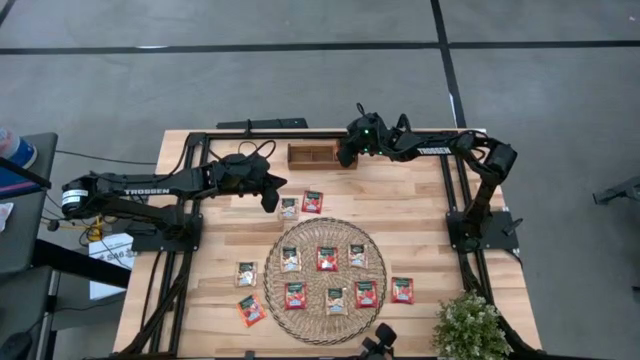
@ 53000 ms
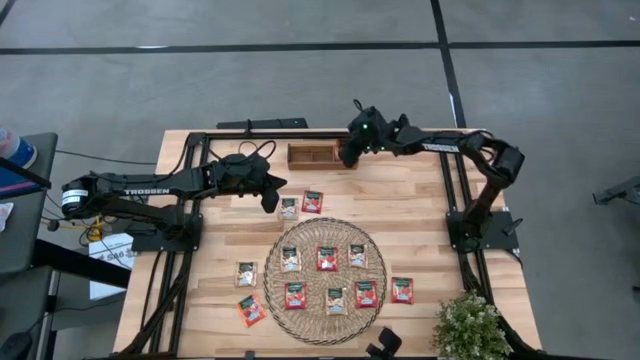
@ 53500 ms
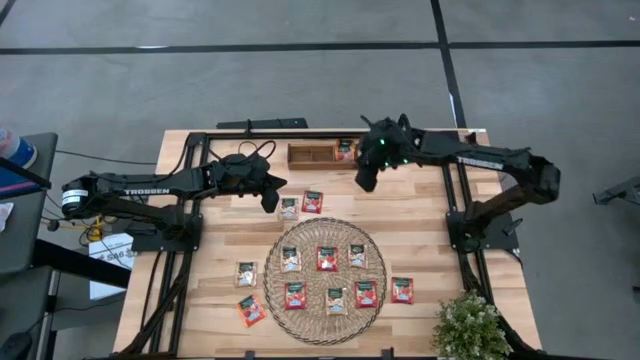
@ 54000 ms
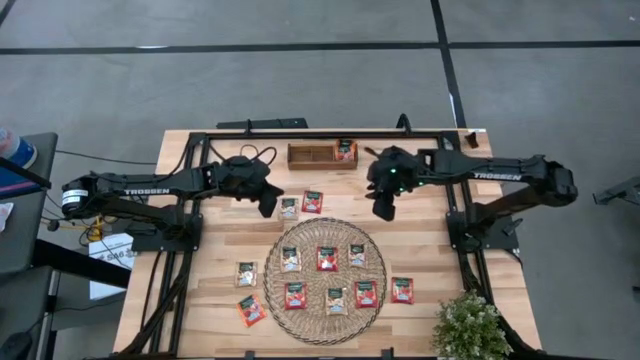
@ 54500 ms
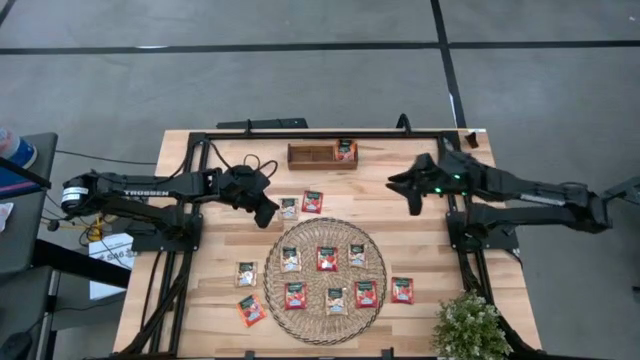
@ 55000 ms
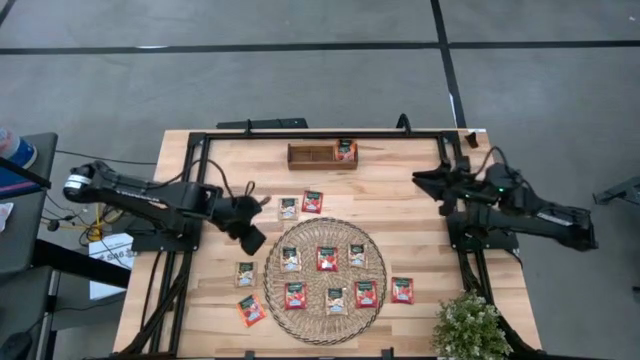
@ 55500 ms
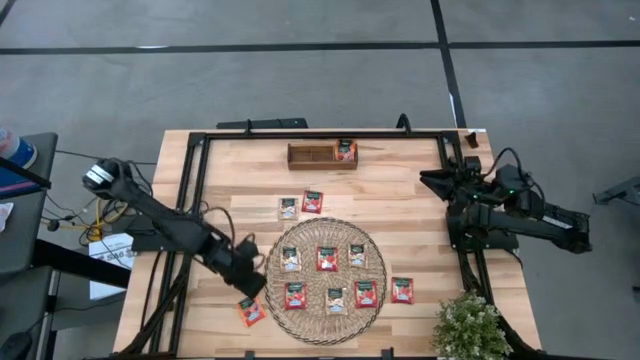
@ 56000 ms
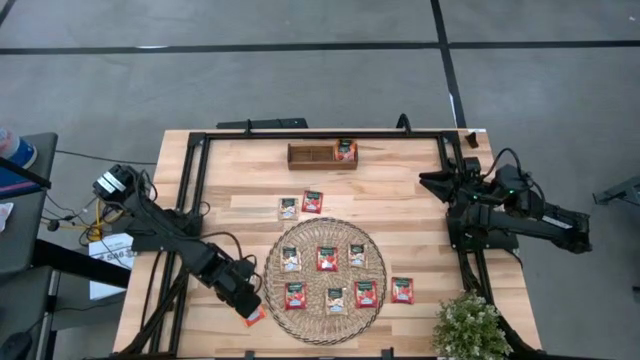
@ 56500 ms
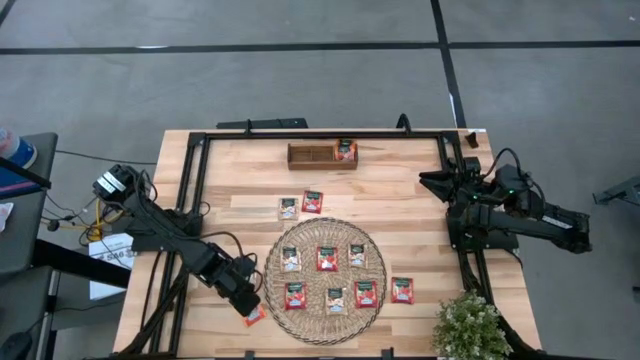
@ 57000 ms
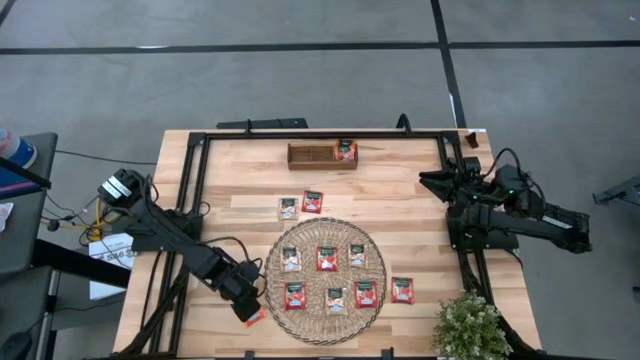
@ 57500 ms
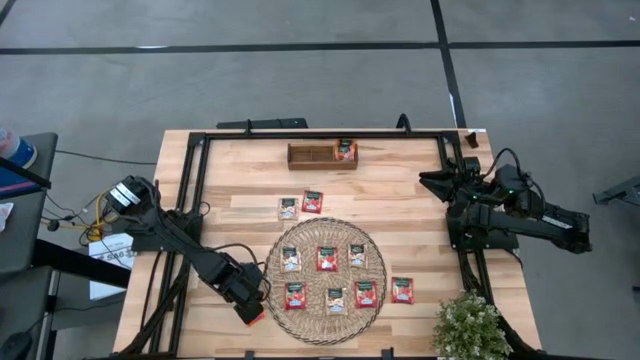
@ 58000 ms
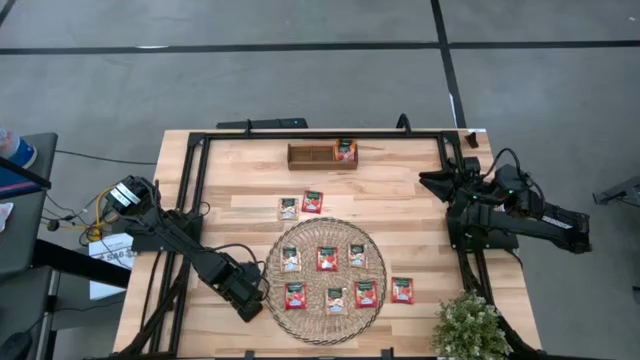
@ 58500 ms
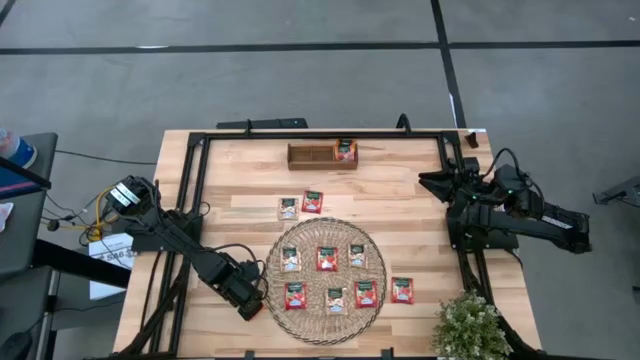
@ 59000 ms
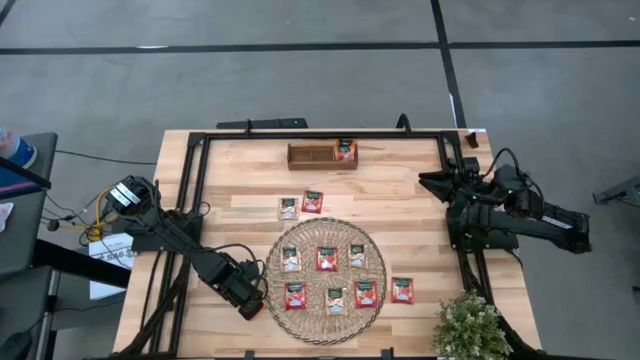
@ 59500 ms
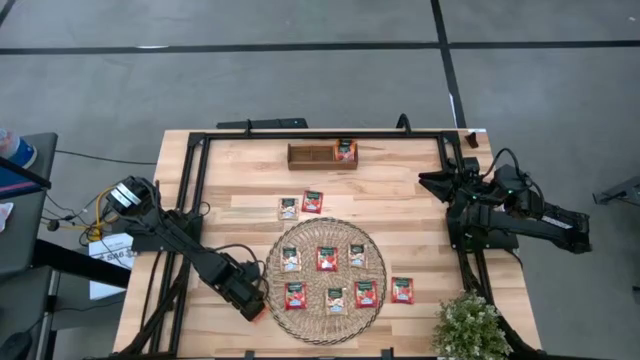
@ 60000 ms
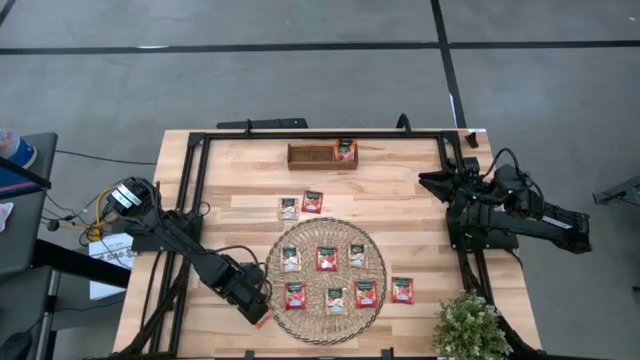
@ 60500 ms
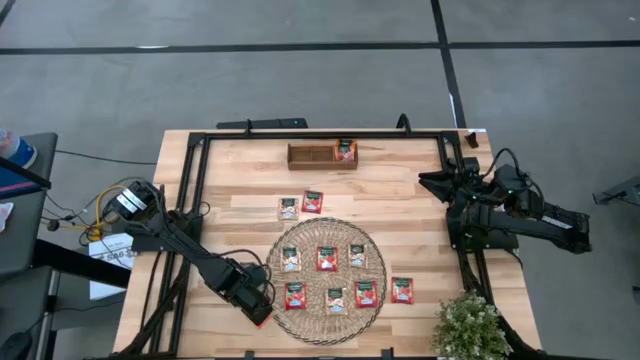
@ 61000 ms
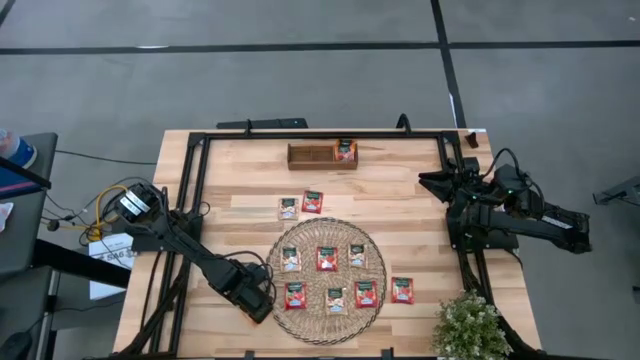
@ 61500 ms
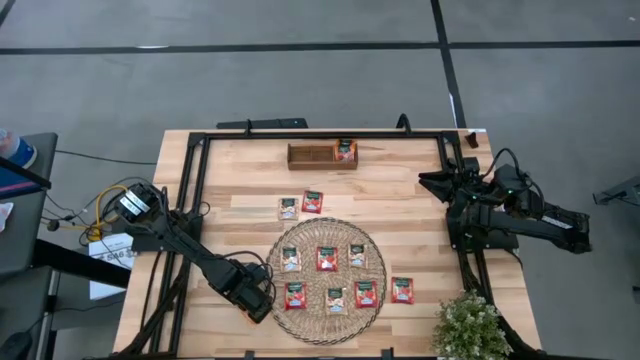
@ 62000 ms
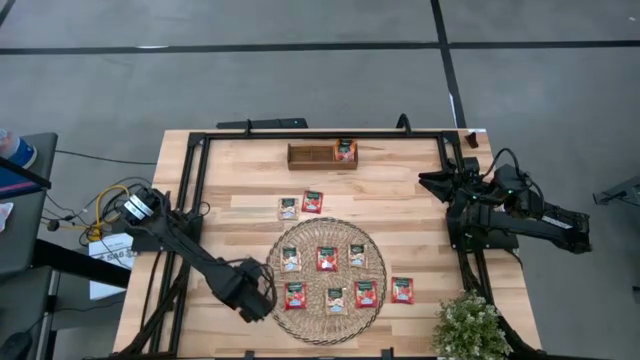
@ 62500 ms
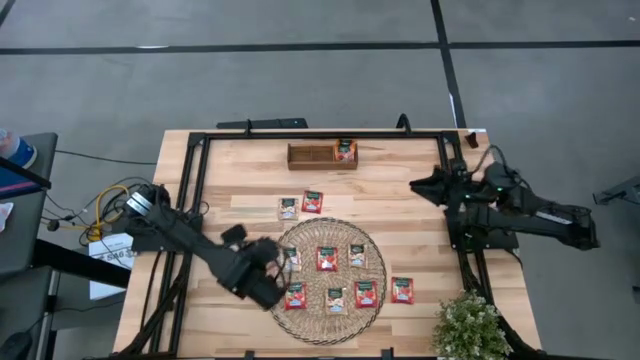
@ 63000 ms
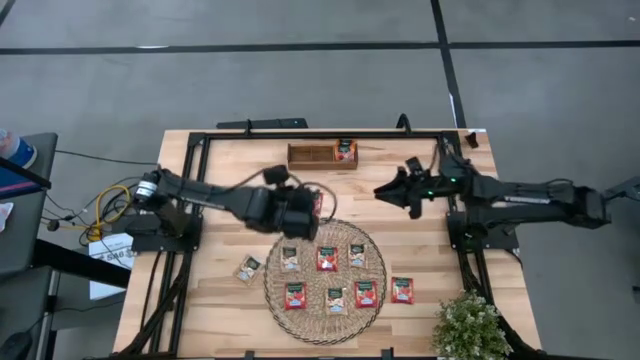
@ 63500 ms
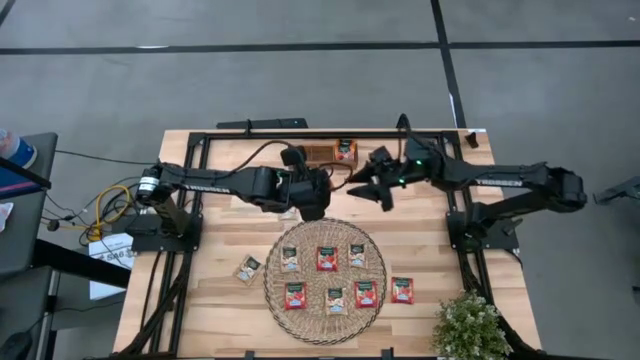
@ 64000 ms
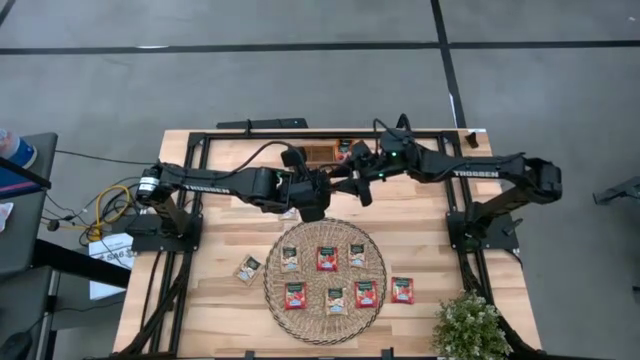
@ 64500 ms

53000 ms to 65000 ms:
Task: Pick & Place Tea
Put the orange tea bag into the right section of the wooden organizer

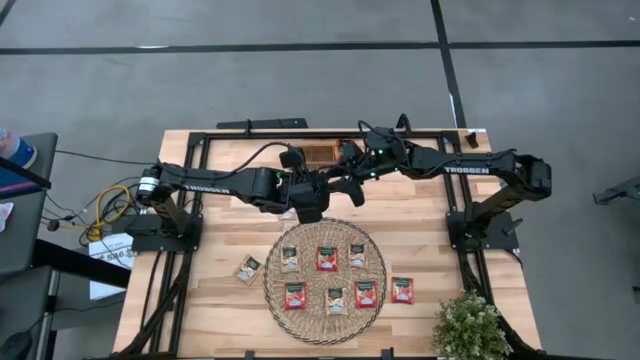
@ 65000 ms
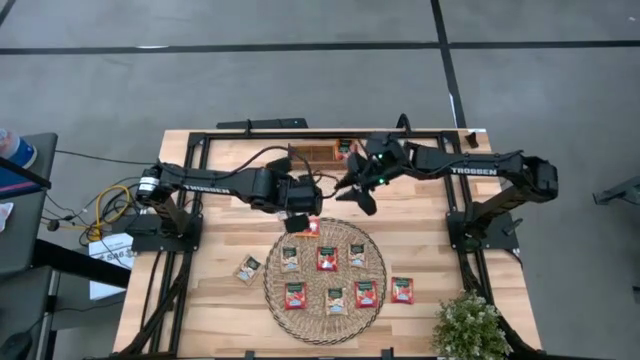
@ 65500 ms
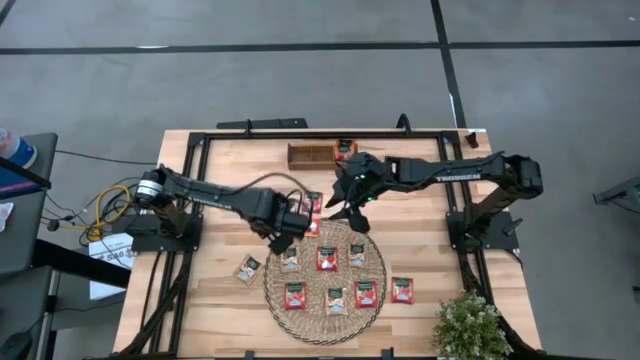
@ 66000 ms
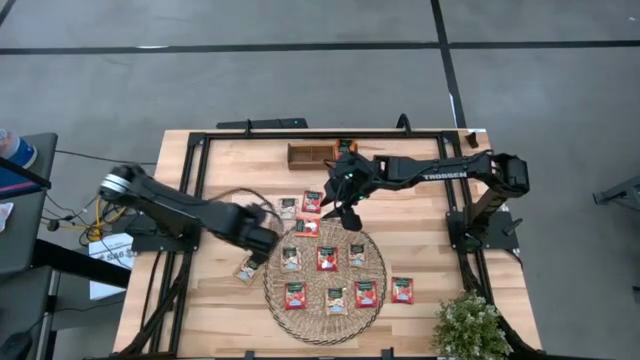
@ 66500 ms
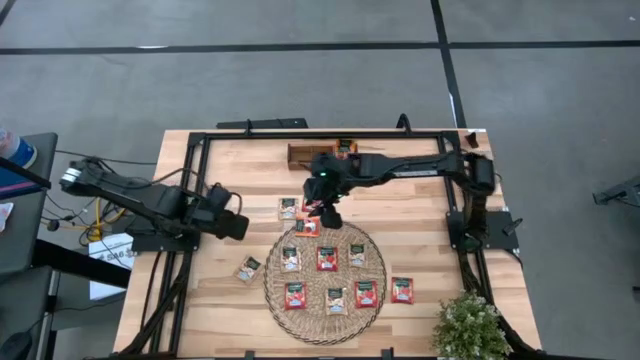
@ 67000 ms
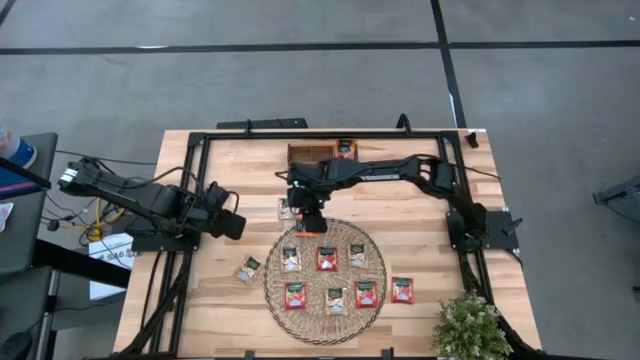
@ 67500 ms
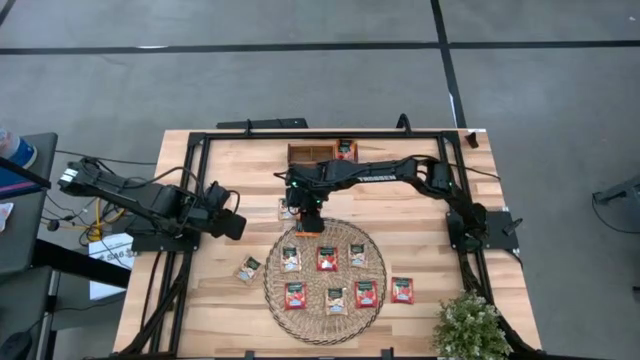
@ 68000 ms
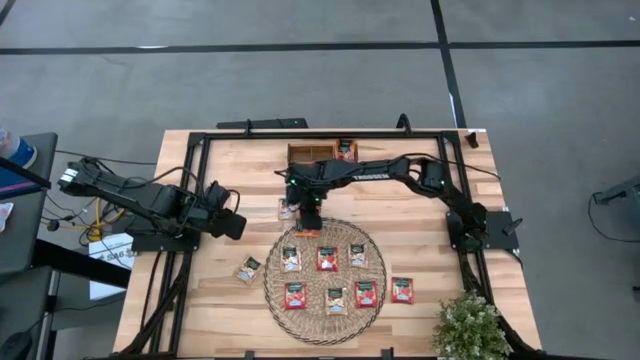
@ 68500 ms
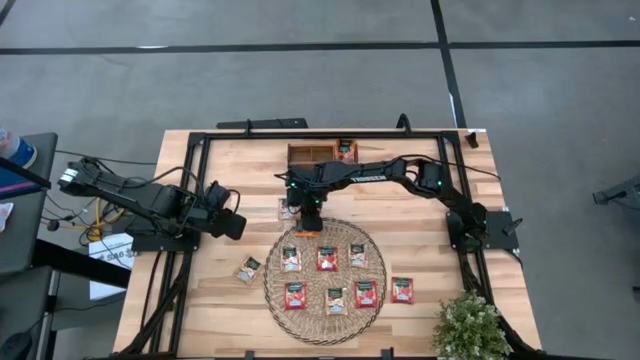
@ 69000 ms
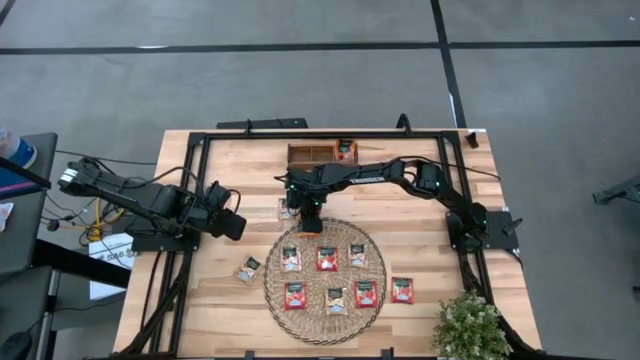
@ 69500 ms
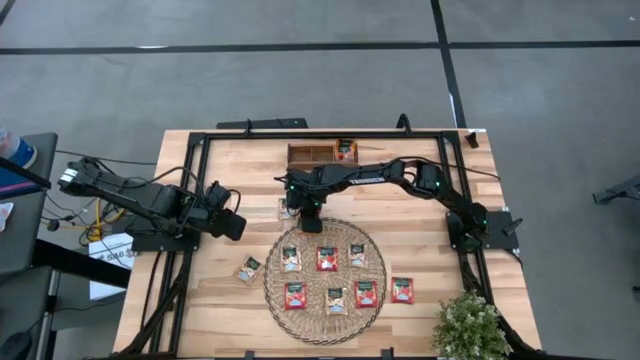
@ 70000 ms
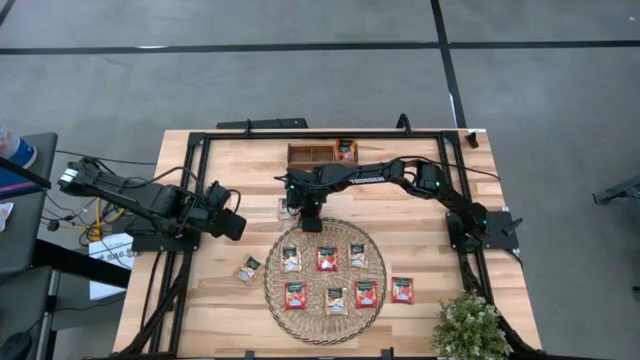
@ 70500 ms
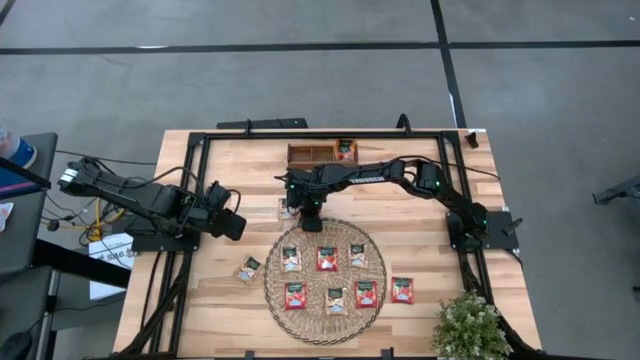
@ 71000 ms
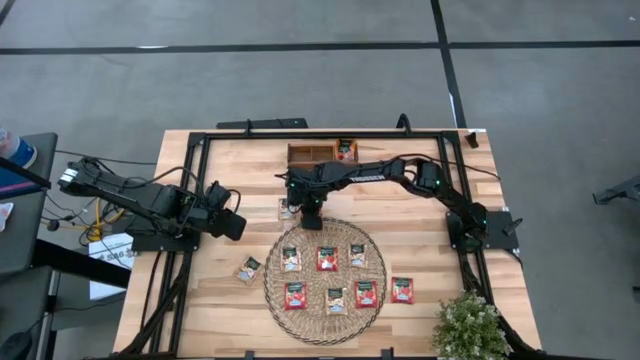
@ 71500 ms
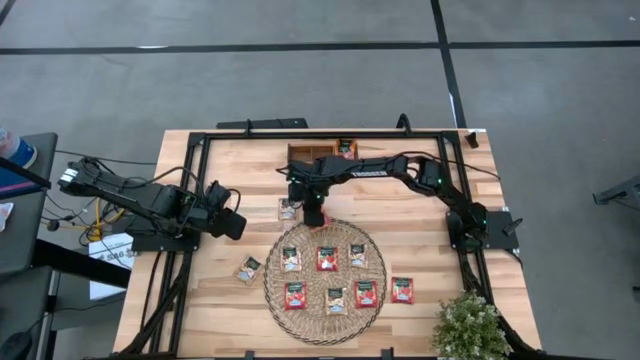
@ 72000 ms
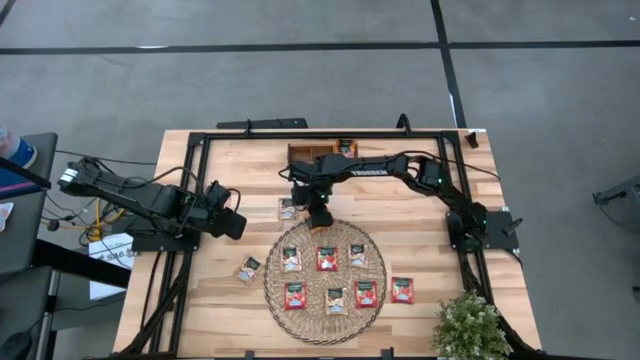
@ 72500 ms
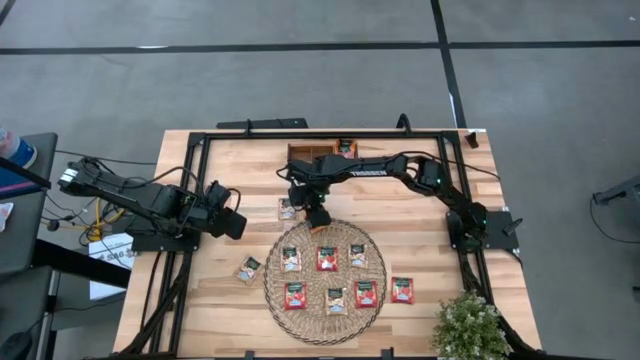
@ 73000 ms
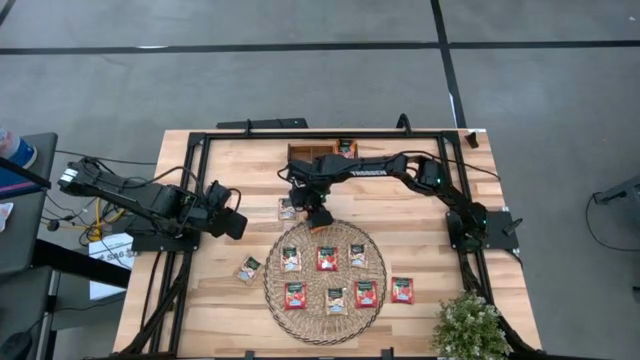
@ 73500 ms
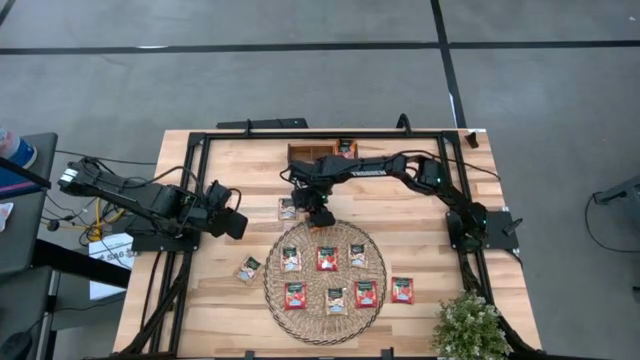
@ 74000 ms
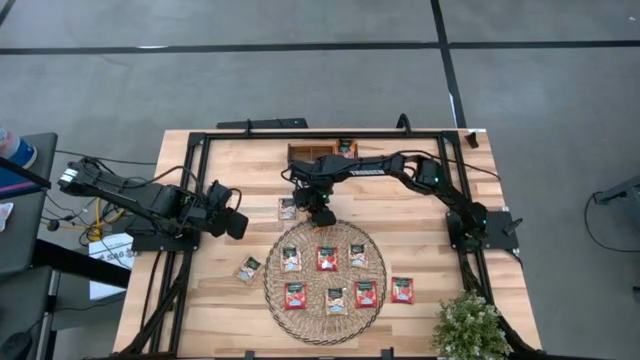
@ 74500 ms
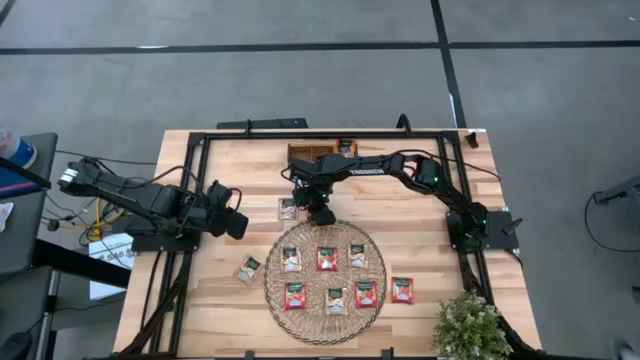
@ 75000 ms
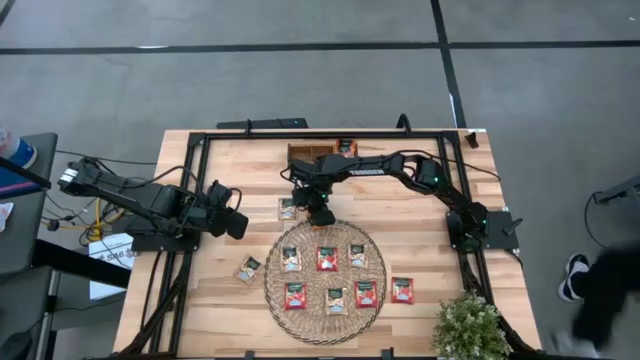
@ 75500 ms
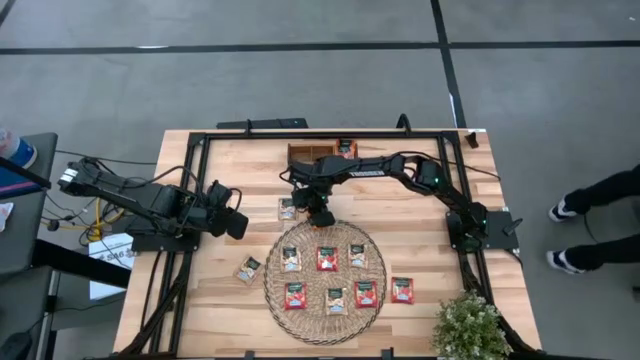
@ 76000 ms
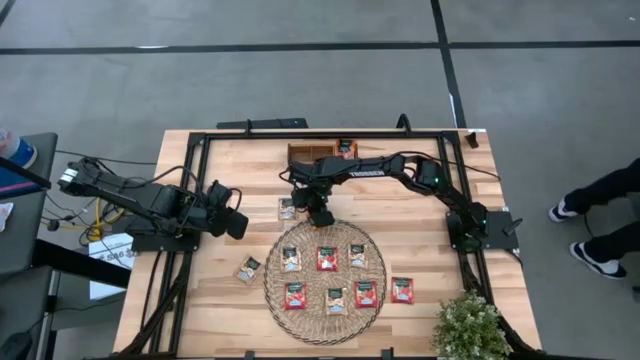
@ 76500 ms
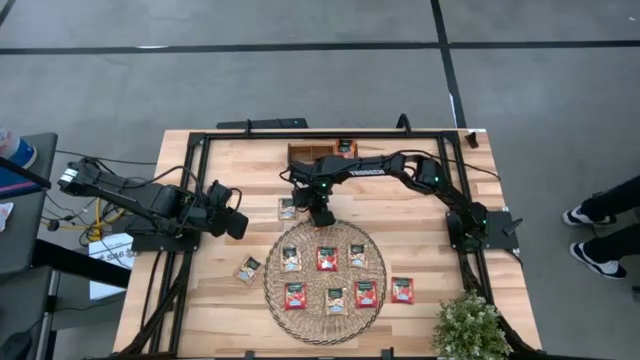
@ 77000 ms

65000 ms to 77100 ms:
Put the orange tea bag into the right section of the wooden organizer
